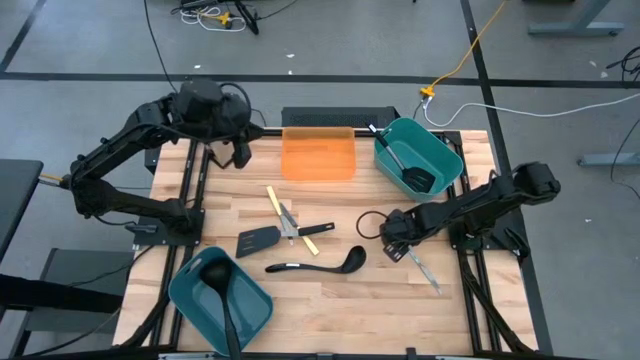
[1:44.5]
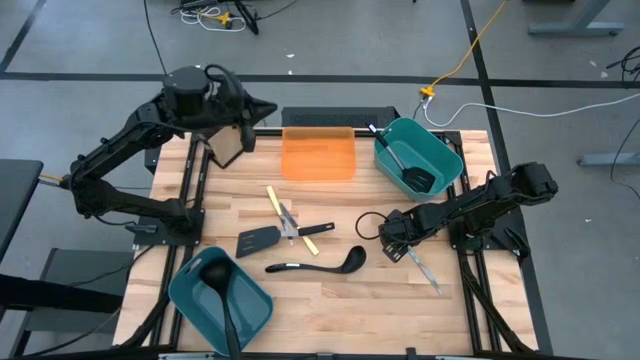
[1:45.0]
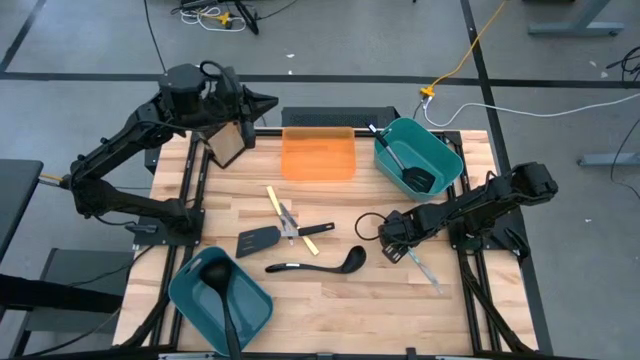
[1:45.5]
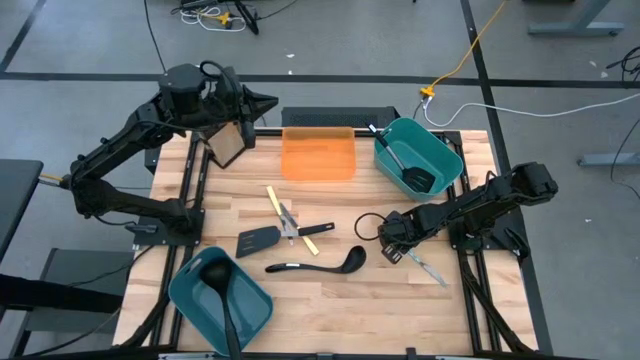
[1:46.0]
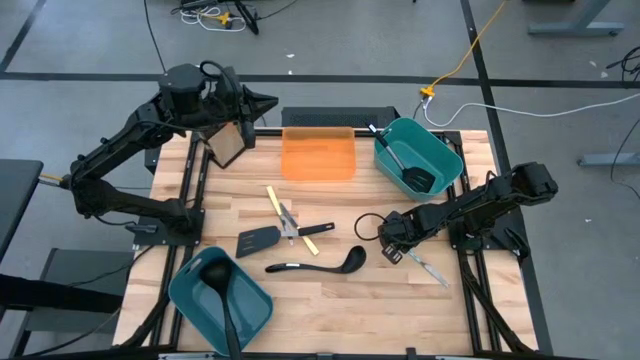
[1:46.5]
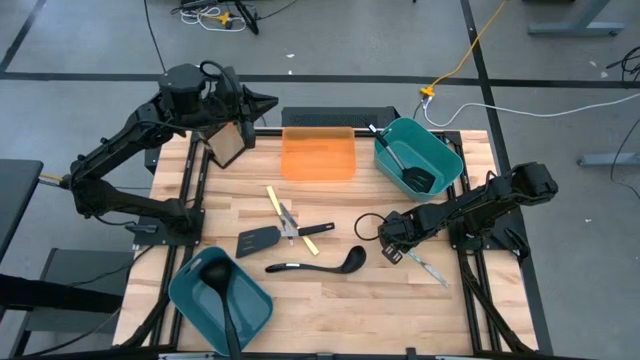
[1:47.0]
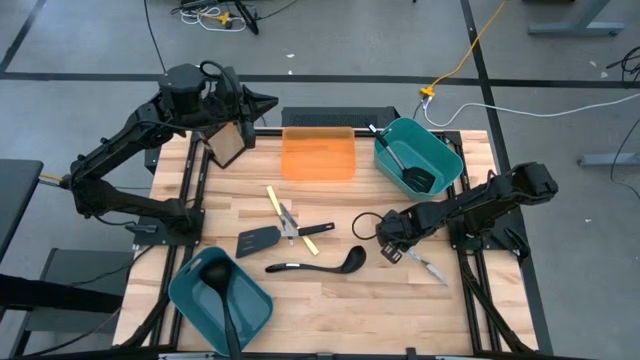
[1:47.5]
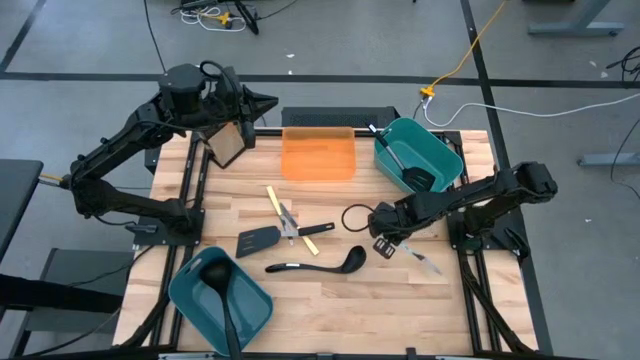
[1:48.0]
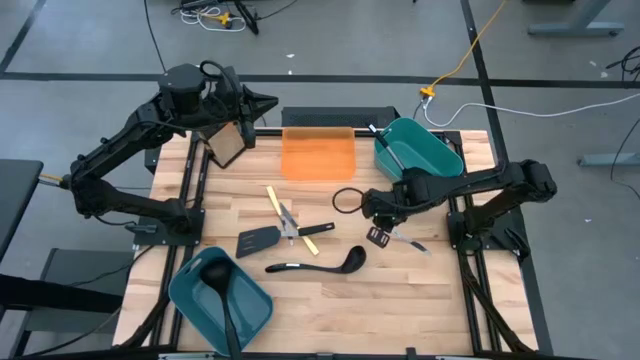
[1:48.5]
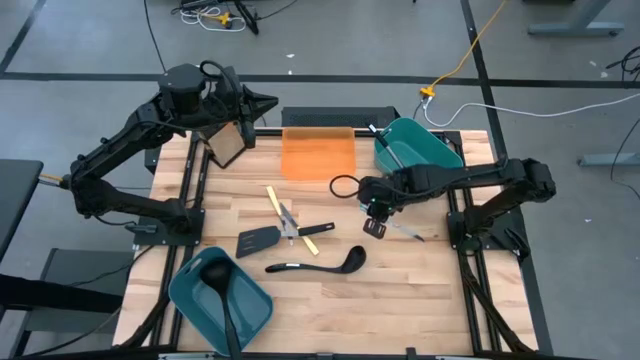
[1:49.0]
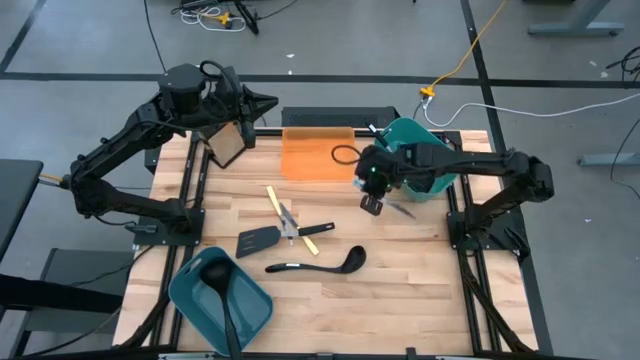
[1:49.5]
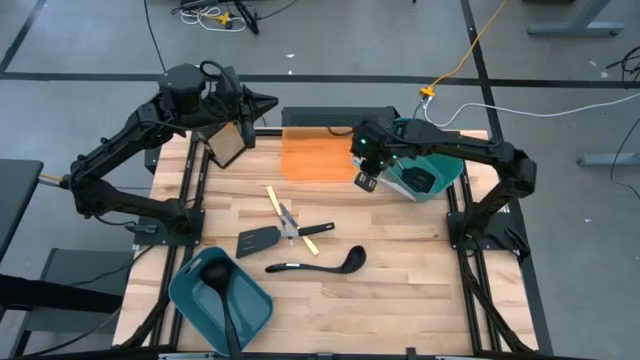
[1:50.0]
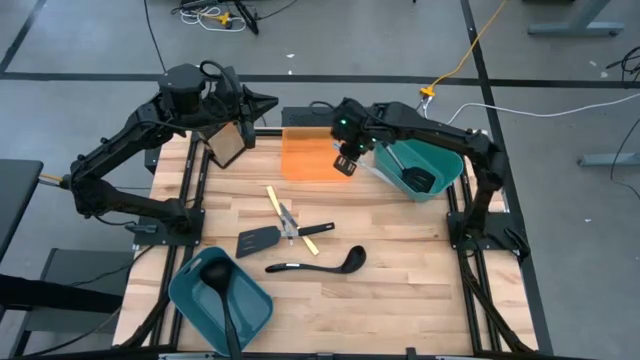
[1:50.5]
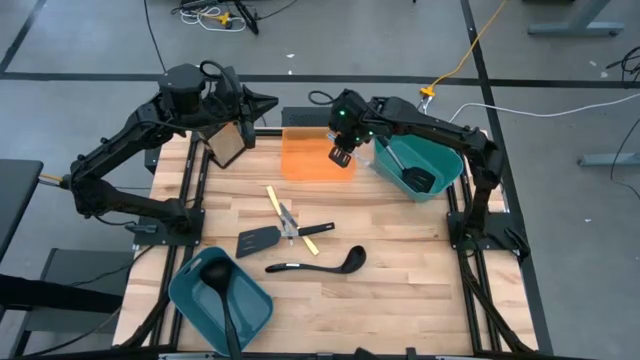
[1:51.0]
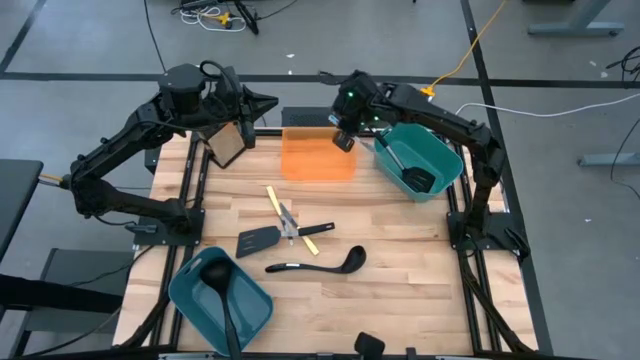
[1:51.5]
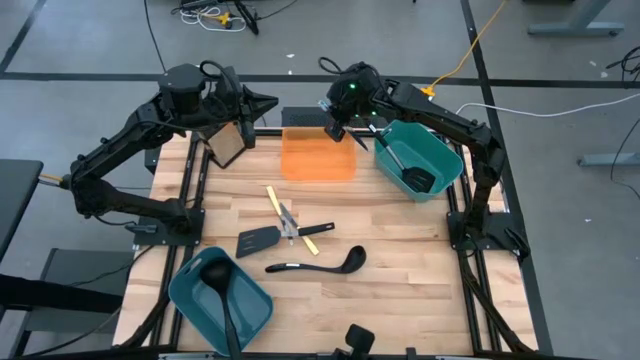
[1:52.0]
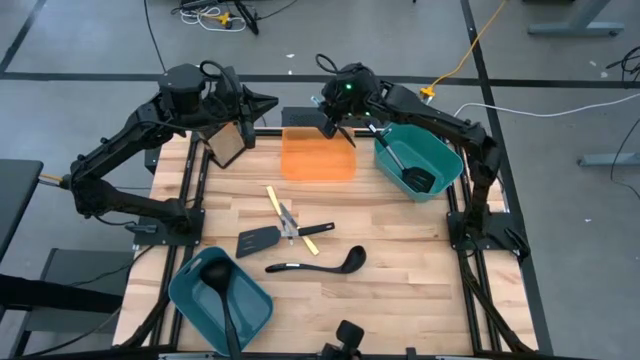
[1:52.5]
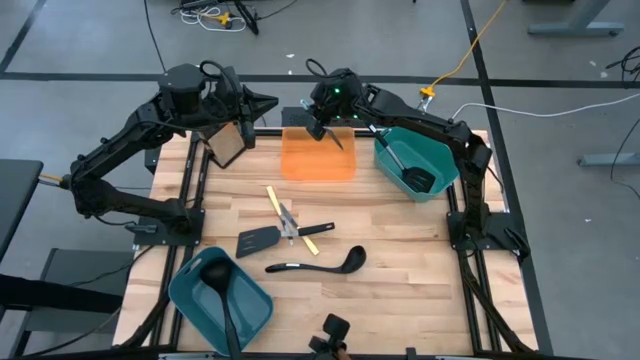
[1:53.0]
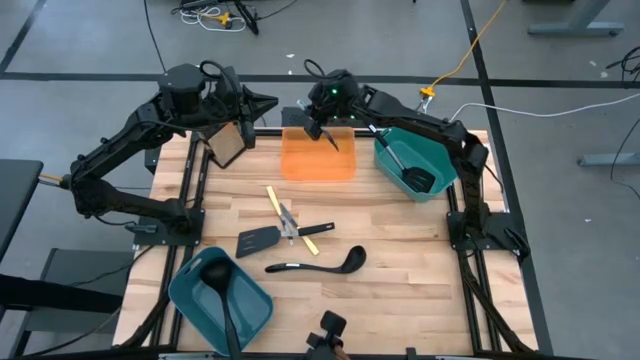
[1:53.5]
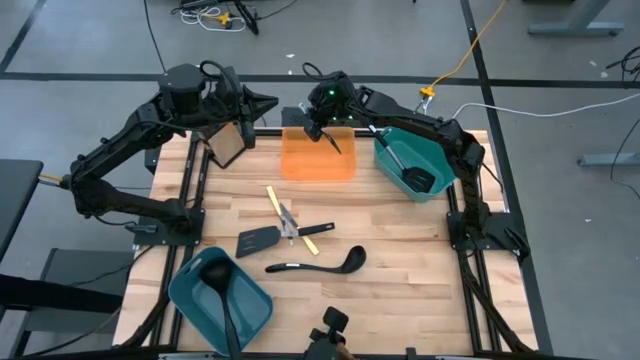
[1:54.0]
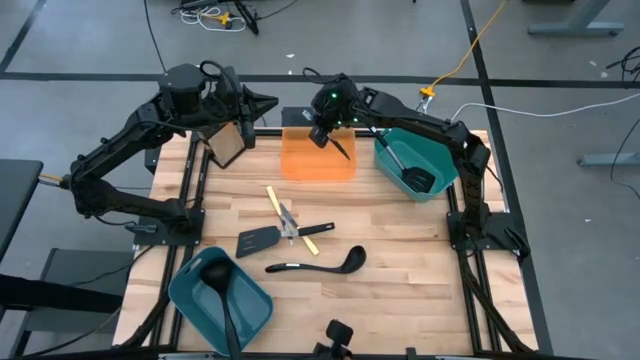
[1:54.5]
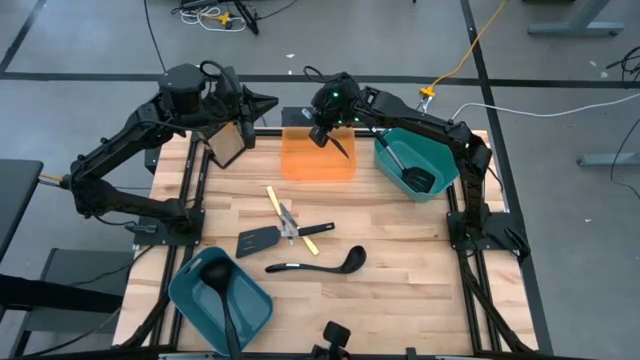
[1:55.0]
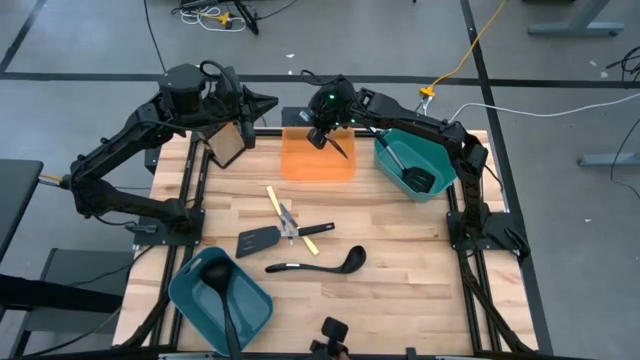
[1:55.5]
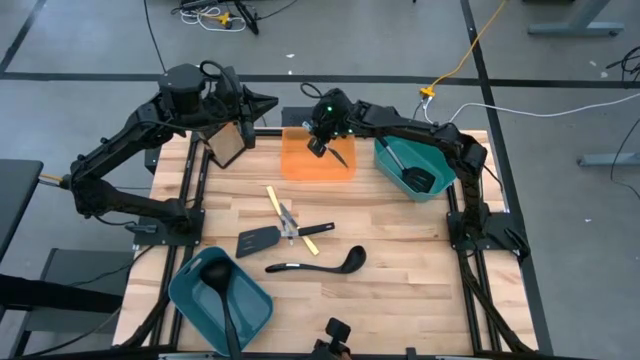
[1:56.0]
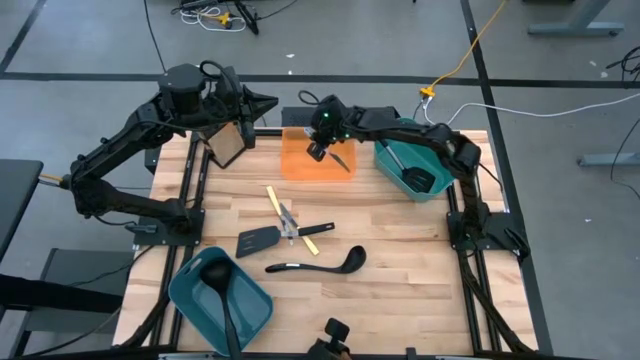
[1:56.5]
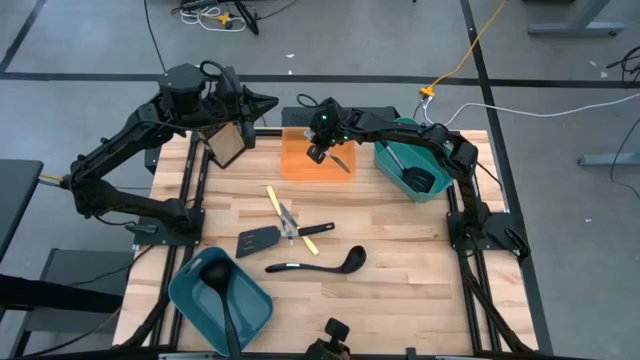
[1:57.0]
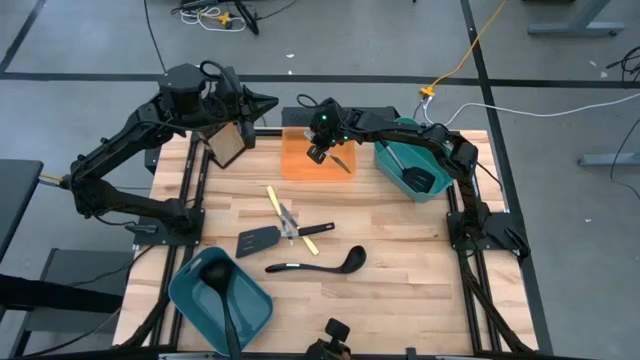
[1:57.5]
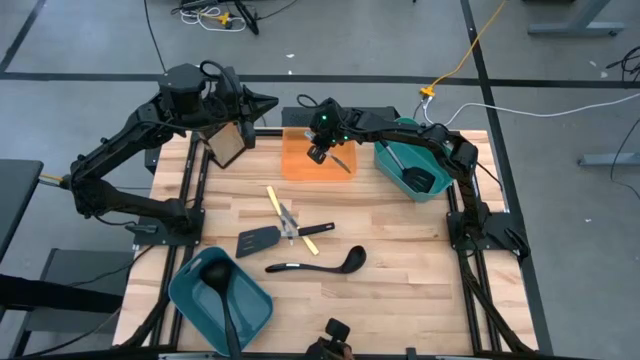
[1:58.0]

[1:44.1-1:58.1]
Task: Pick & Place Kitchen Items
Put the blue knife into the orange bin

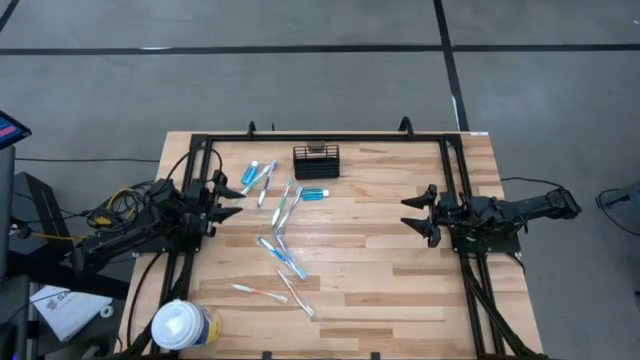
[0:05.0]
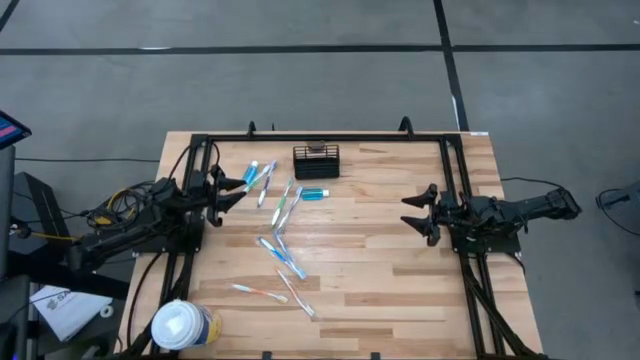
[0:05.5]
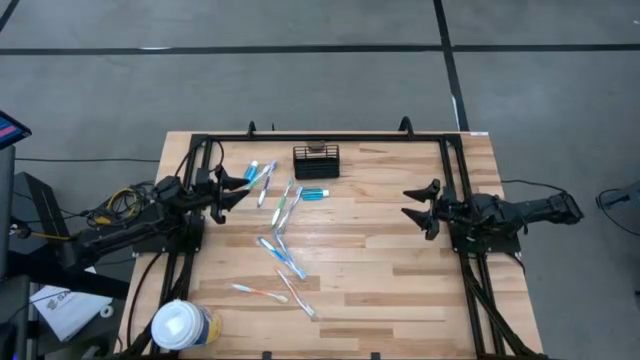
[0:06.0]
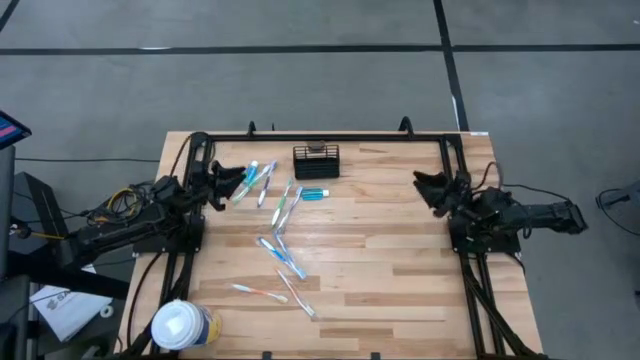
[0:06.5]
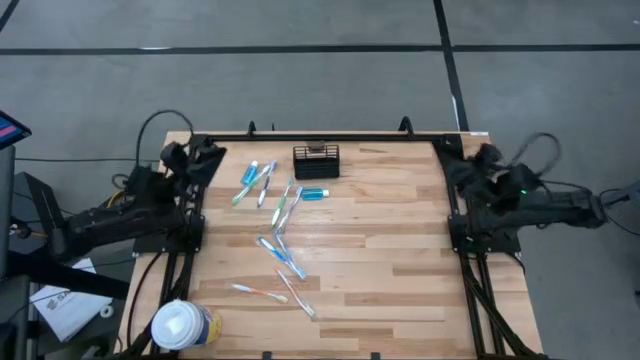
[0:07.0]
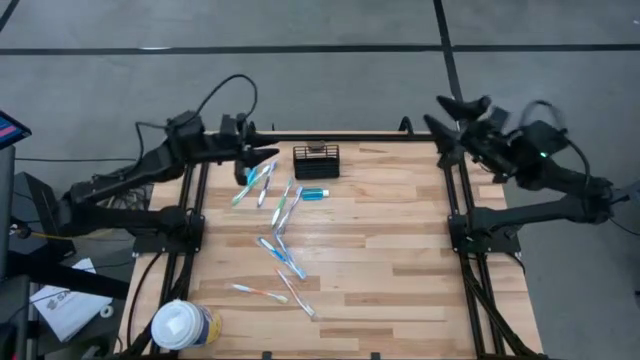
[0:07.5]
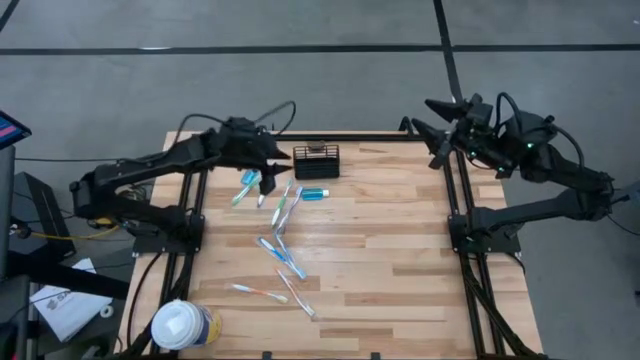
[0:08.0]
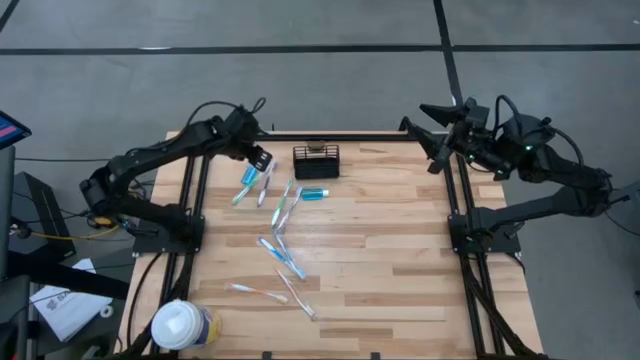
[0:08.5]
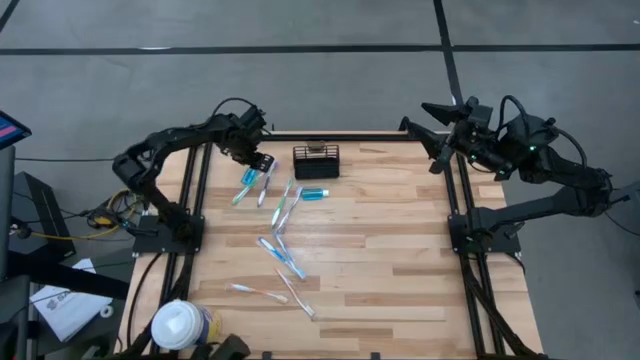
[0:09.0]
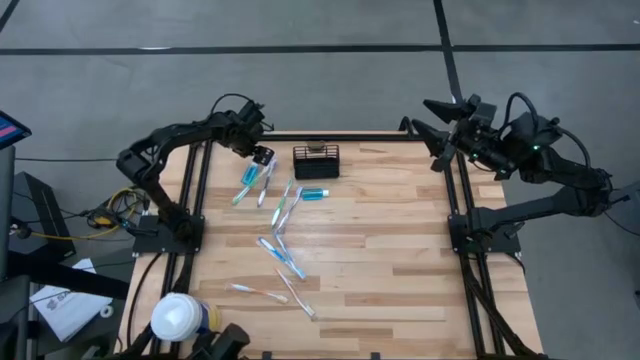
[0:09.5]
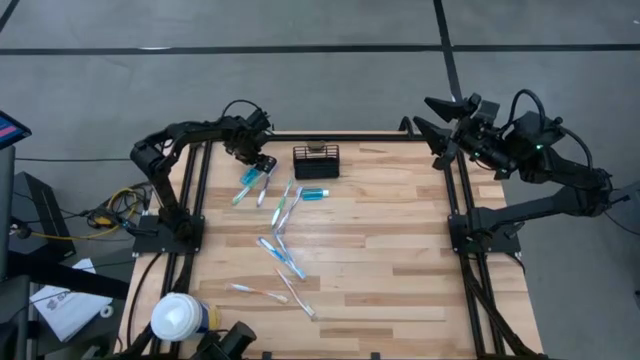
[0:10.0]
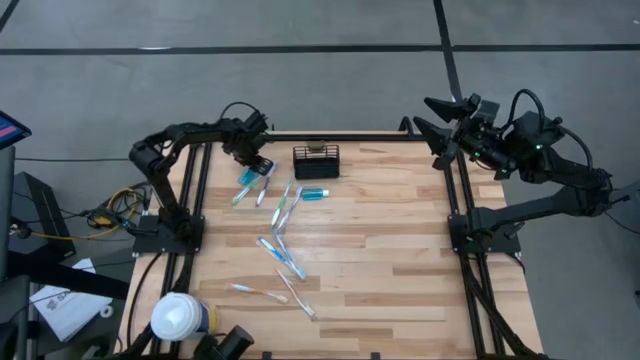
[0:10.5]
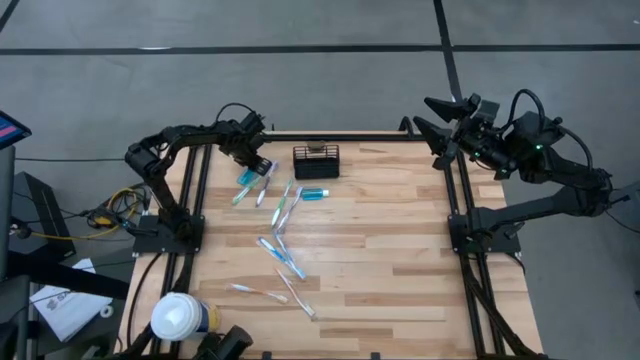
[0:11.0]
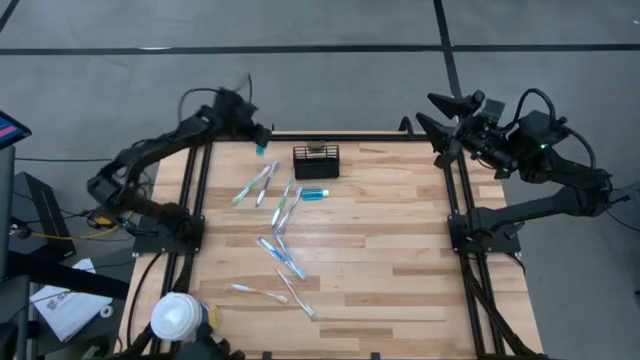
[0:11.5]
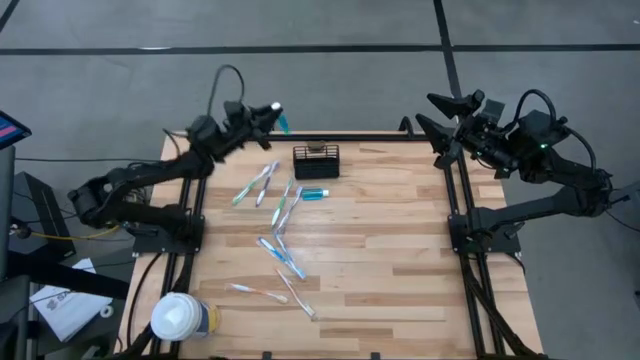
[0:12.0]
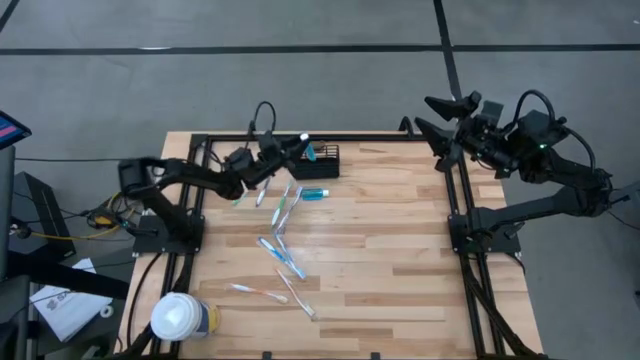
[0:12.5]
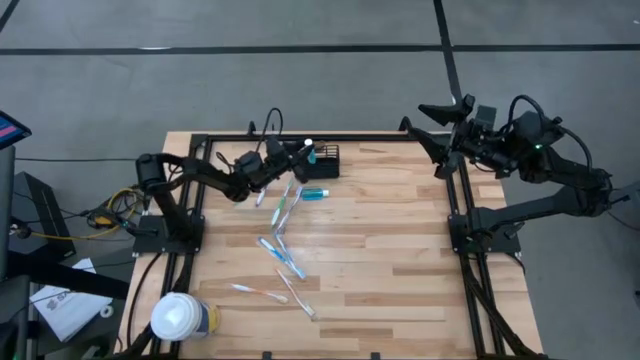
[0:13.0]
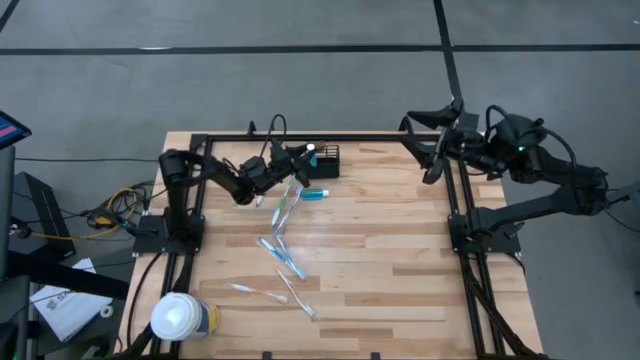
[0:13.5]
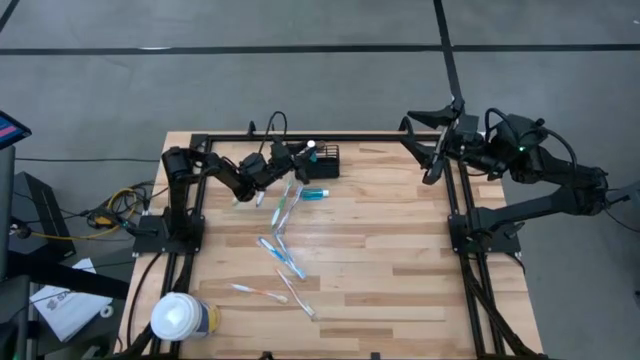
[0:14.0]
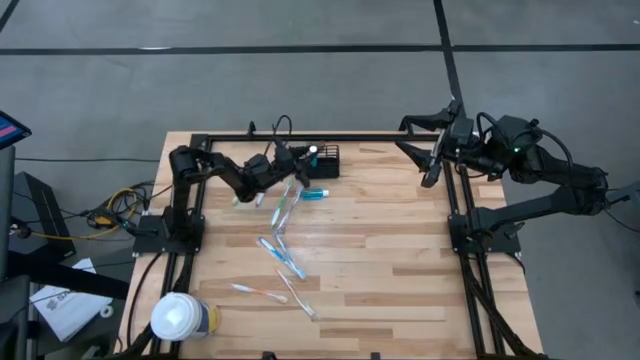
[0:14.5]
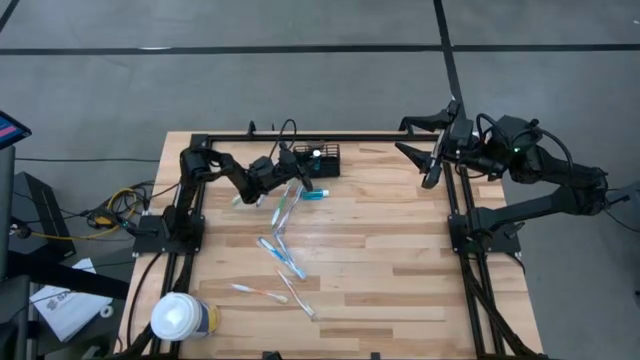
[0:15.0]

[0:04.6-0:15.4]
Task: Pick & Place toothbrushing station
Put the left blue mouthwash into the black wire organizer
